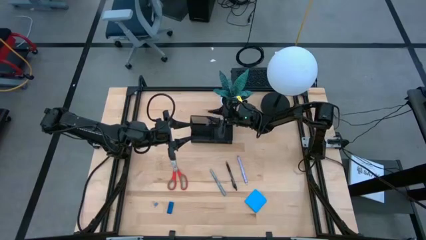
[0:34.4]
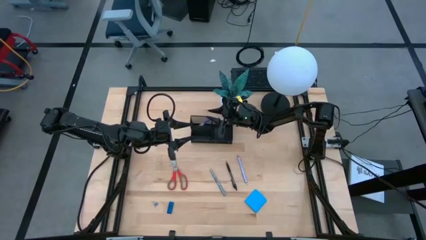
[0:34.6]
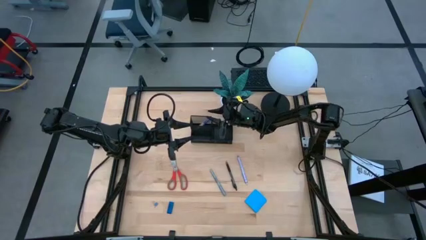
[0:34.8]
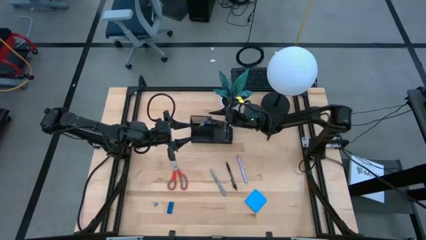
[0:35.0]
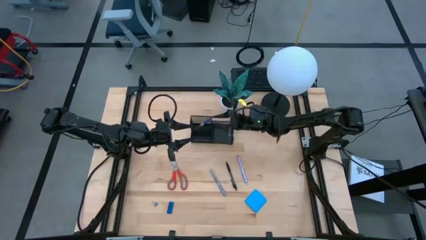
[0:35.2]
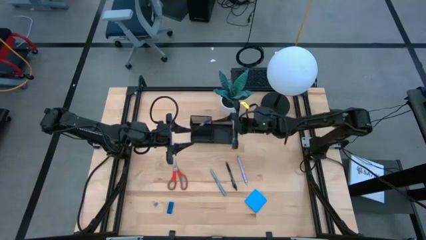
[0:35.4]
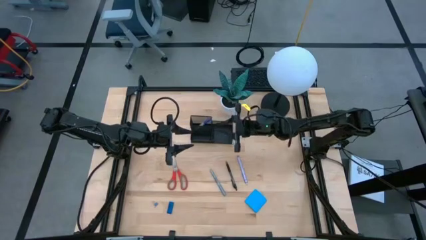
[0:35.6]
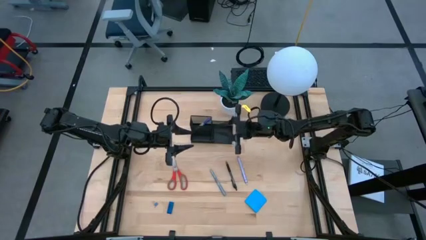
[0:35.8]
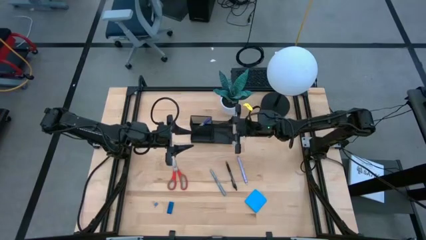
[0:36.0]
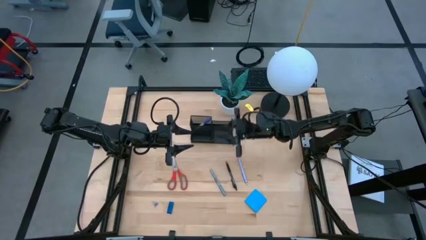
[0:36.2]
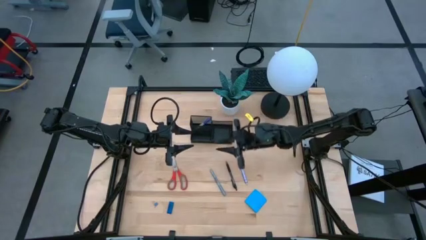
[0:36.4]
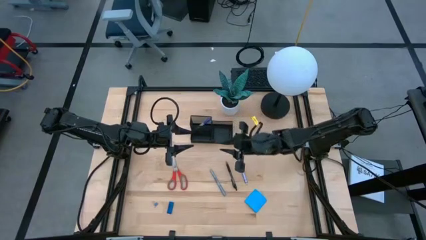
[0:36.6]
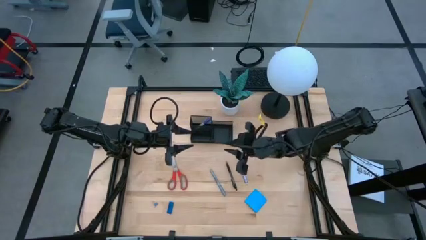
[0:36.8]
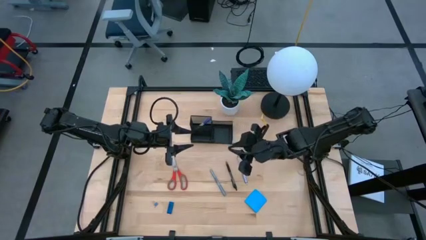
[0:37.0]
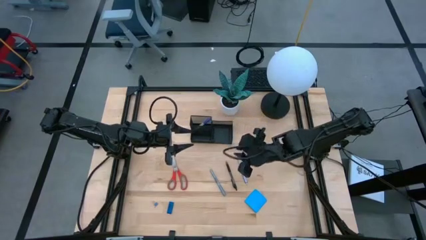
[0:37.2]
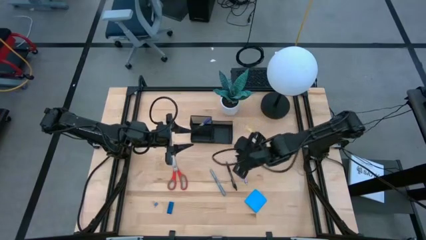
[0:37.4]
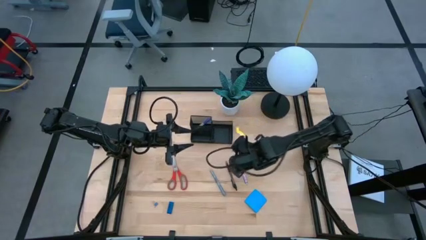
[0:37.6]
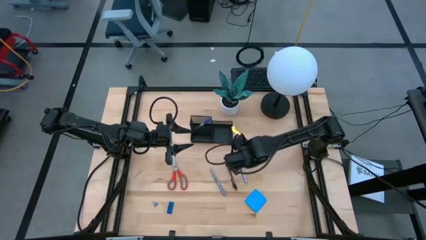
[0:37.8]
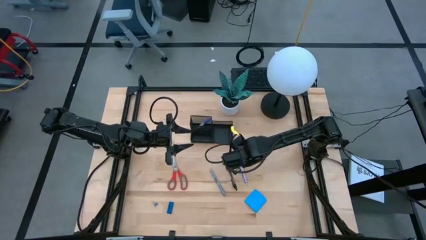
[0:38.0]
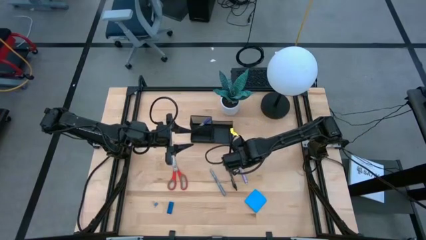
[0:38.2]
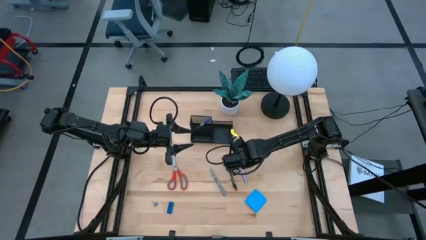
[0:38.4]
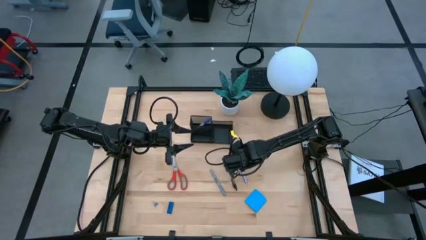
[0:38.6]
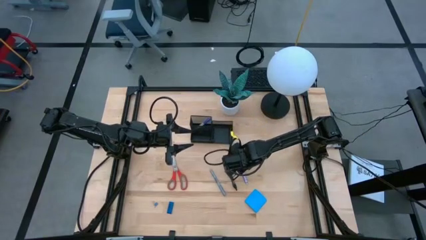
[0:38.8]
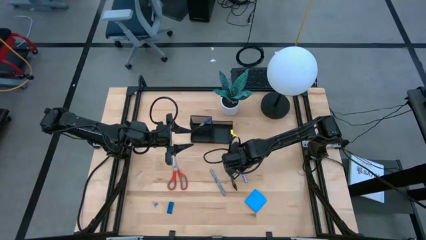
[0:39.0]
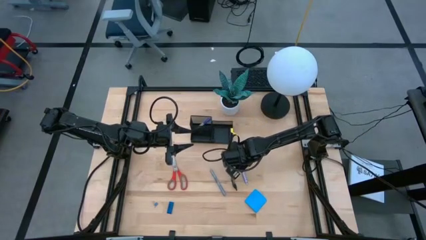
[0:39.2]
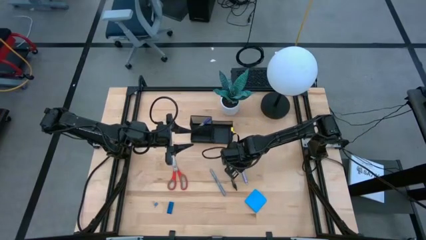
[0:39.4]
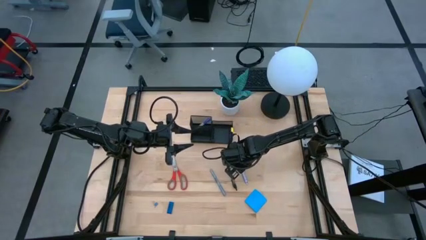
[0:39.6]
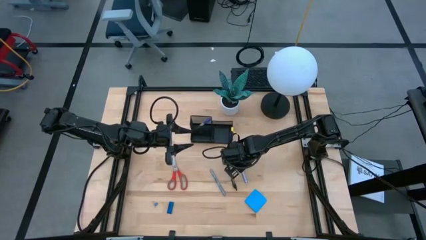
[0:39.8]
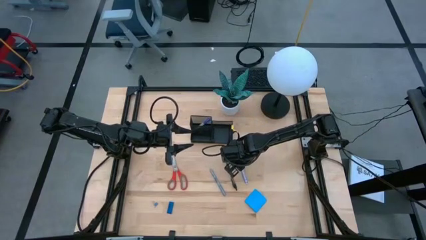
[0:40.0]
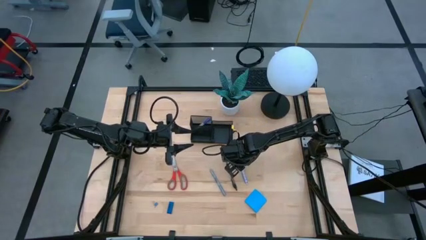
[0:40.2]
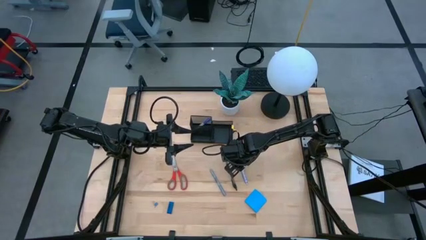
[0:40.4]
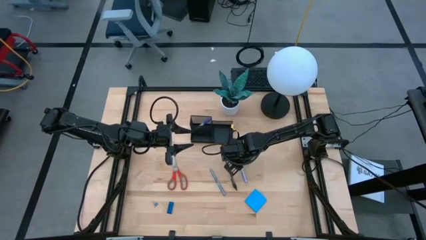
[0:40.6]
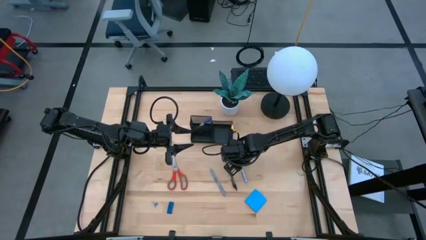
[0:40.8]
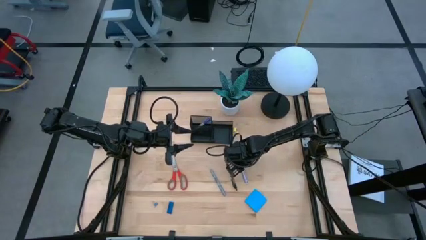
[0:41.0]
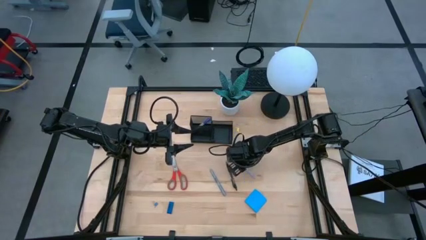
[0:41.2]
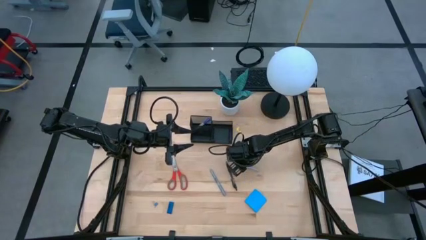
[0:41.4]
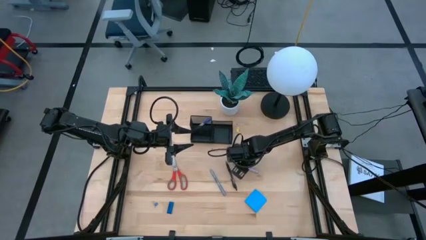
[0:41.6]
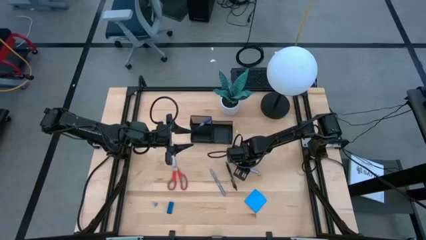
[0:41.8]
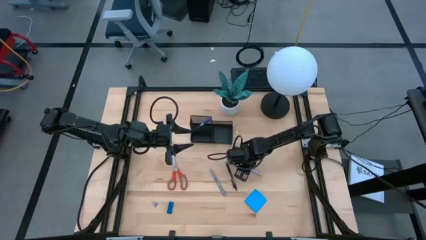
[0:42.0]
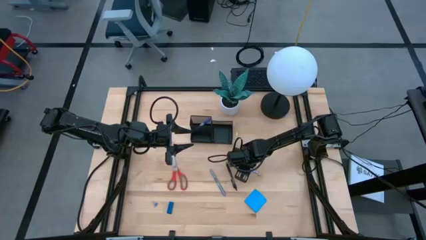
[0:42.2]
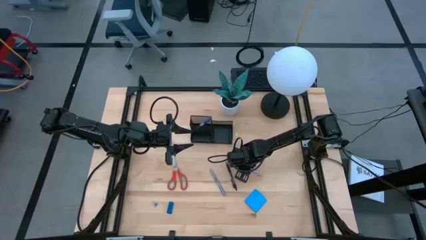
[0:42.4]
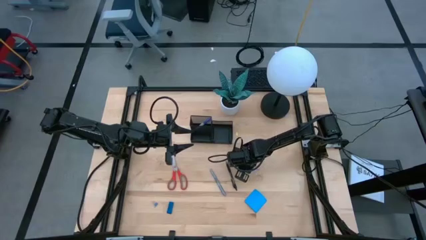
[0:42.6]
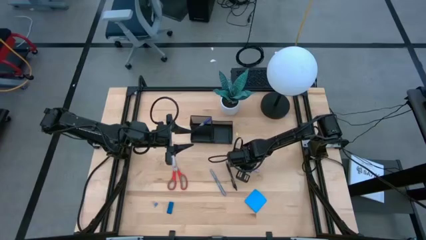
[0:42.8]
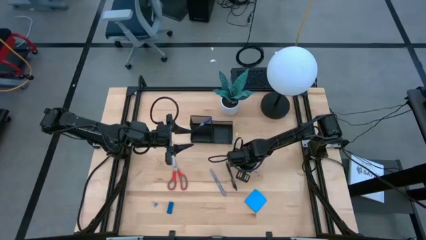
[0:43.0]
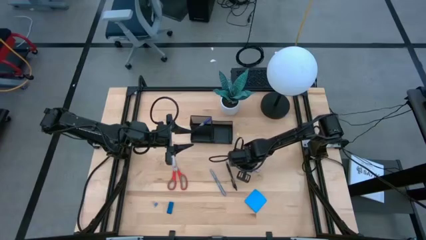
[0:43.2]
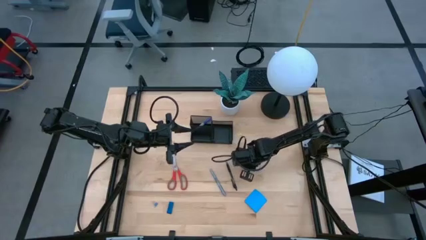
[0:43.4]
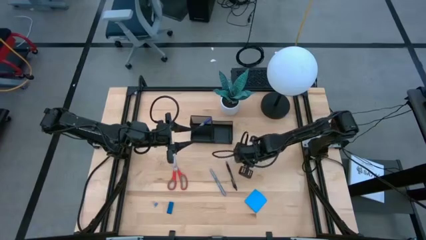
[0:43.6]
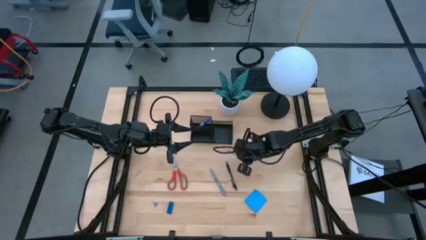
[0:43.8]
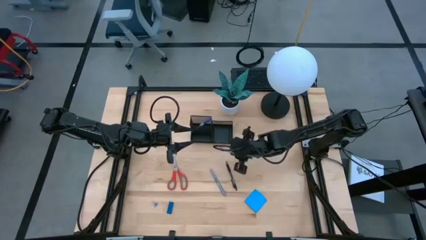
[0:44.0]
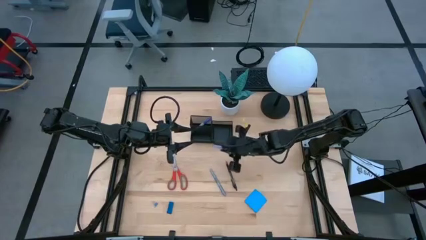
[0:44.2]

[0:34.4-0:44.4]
Task: Pick and place office supplies into organizer
Put the purple pen into the black desk organizer
